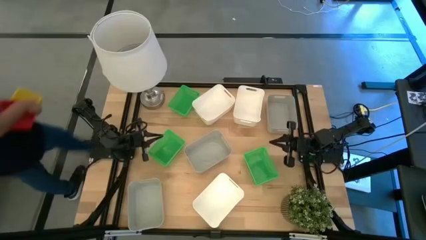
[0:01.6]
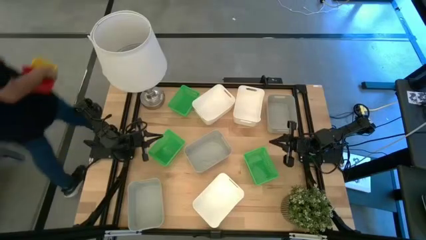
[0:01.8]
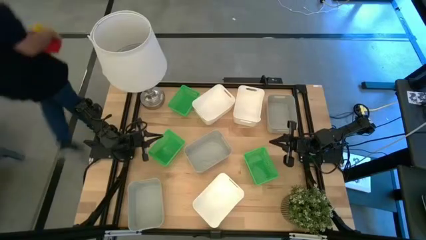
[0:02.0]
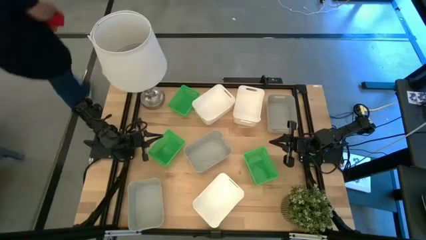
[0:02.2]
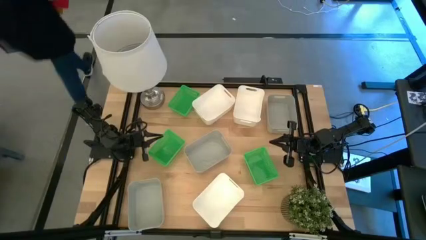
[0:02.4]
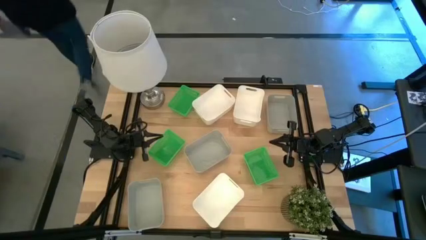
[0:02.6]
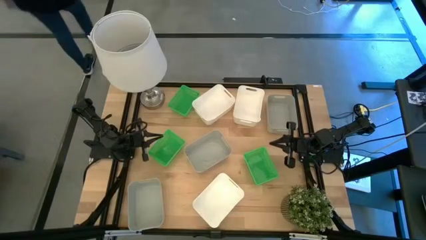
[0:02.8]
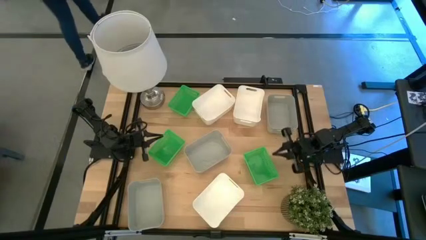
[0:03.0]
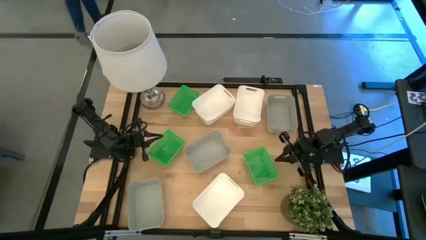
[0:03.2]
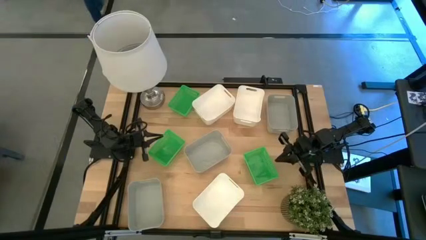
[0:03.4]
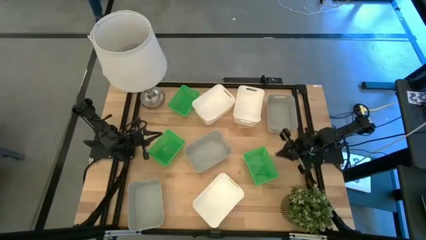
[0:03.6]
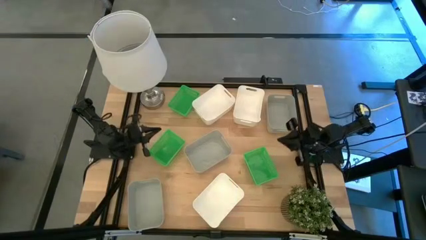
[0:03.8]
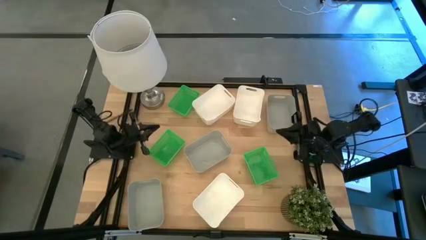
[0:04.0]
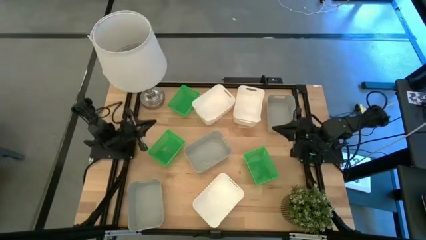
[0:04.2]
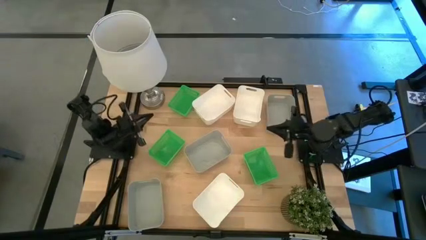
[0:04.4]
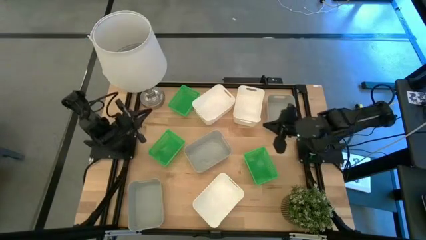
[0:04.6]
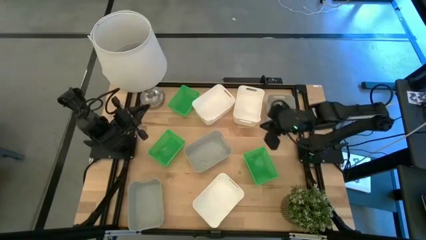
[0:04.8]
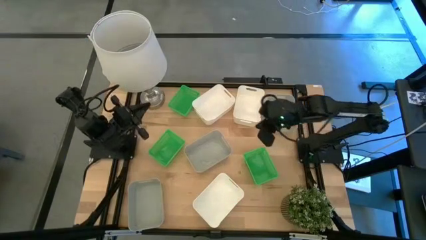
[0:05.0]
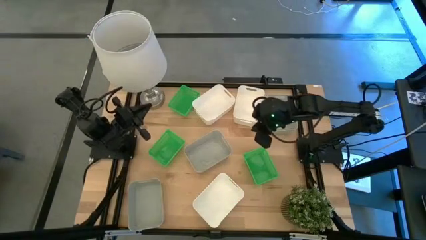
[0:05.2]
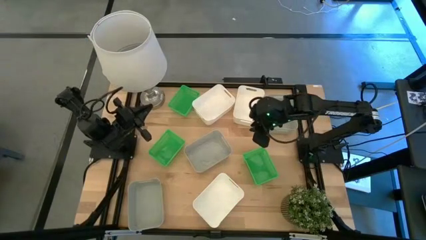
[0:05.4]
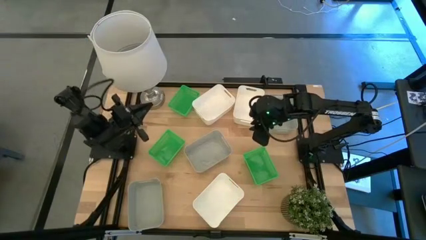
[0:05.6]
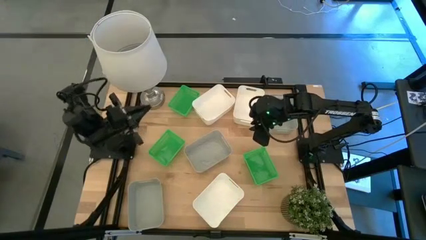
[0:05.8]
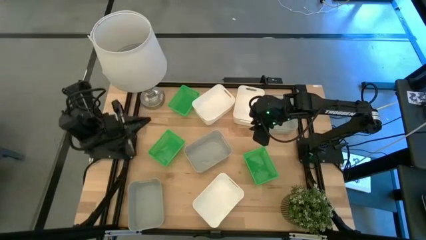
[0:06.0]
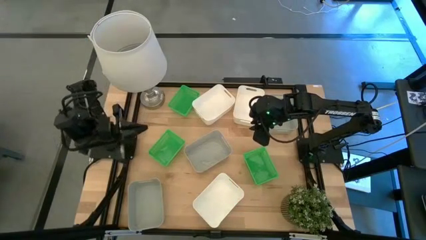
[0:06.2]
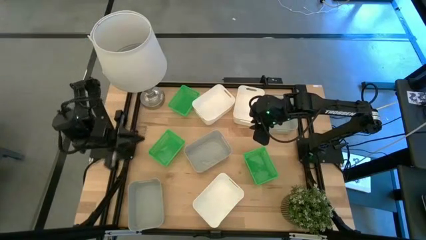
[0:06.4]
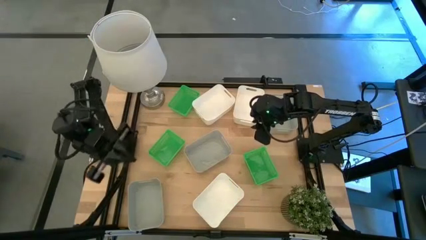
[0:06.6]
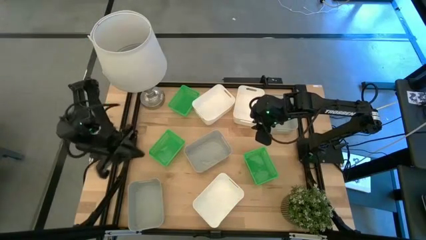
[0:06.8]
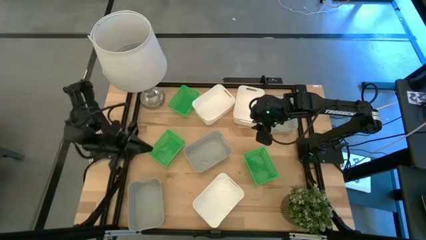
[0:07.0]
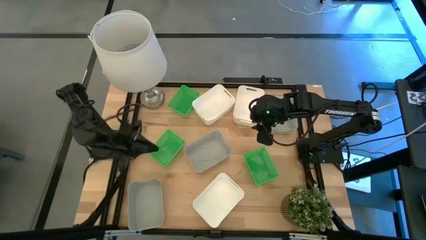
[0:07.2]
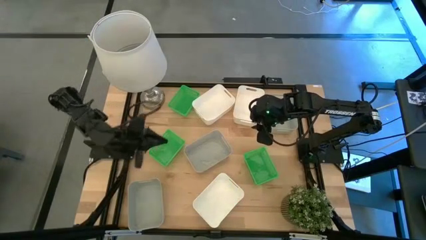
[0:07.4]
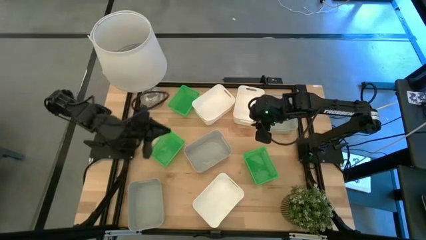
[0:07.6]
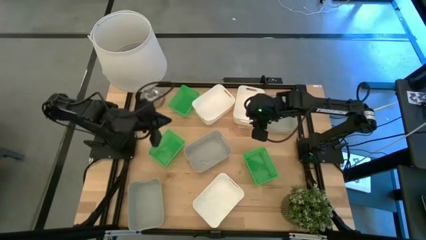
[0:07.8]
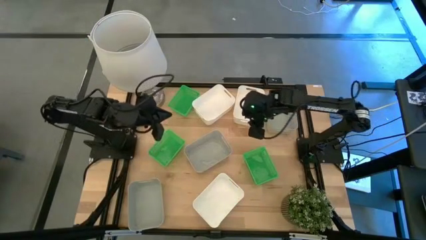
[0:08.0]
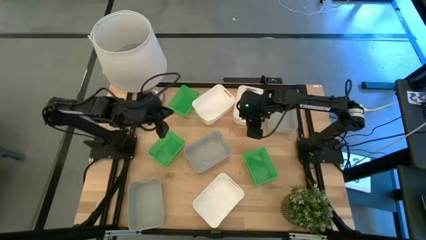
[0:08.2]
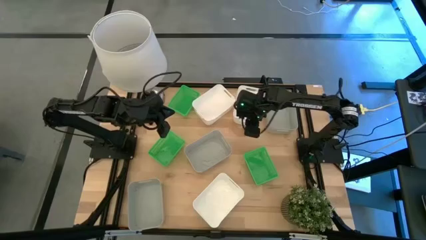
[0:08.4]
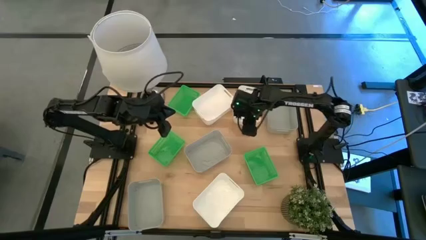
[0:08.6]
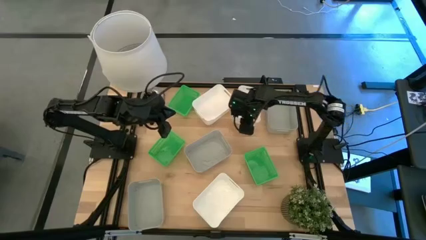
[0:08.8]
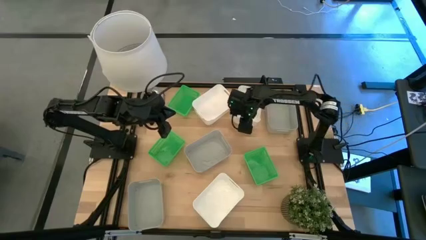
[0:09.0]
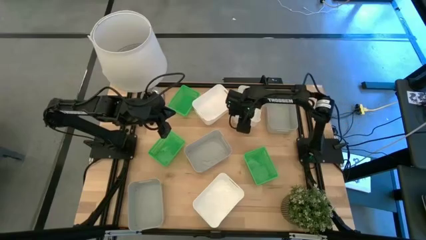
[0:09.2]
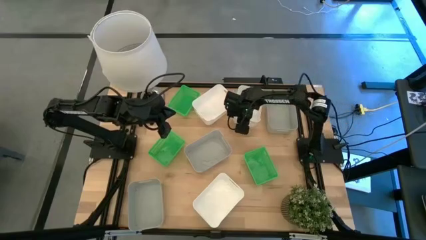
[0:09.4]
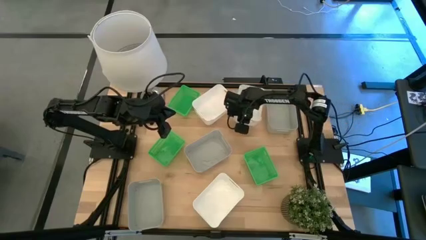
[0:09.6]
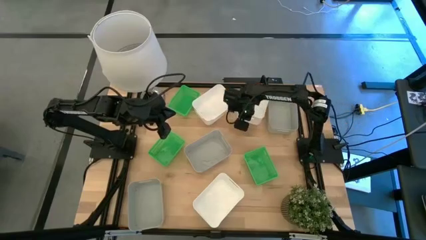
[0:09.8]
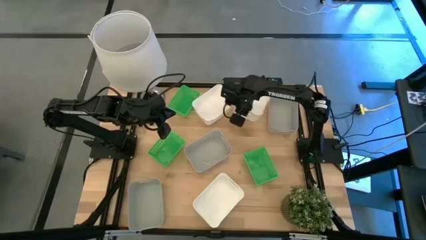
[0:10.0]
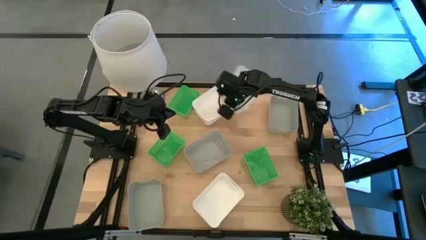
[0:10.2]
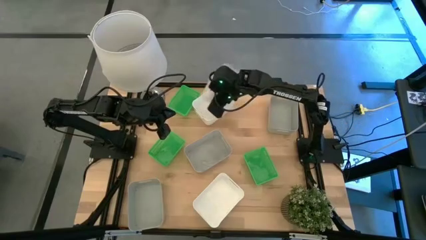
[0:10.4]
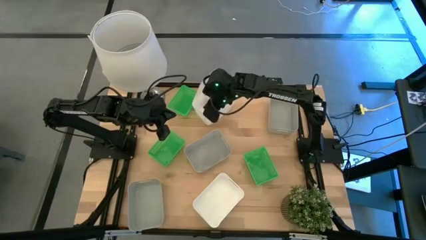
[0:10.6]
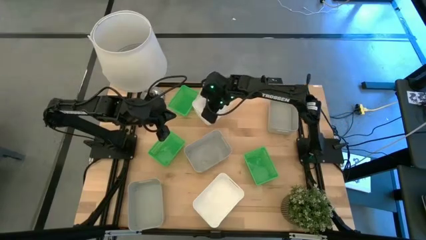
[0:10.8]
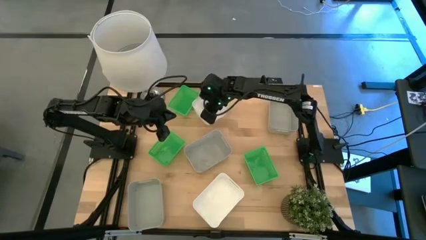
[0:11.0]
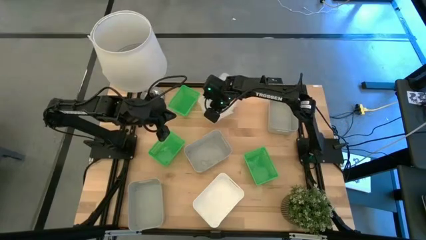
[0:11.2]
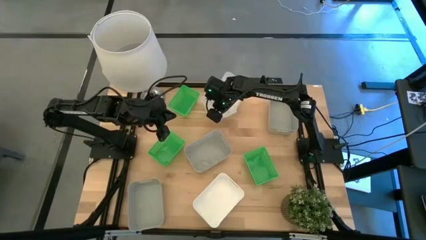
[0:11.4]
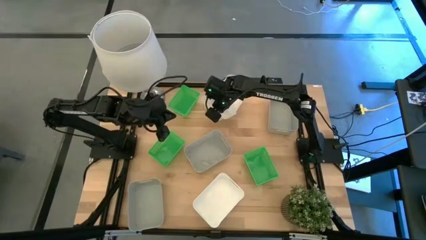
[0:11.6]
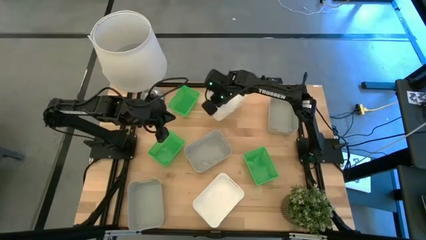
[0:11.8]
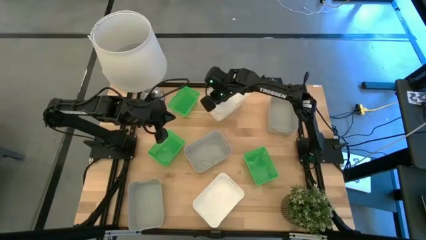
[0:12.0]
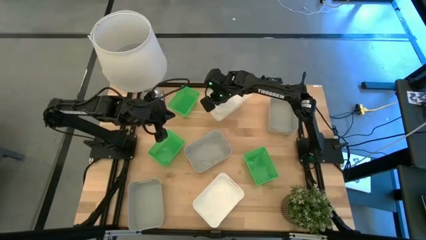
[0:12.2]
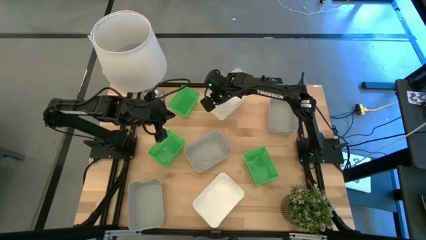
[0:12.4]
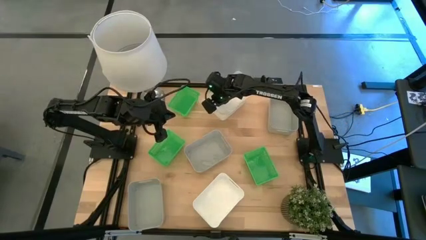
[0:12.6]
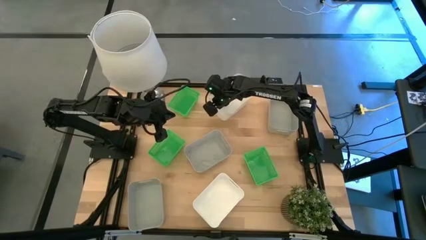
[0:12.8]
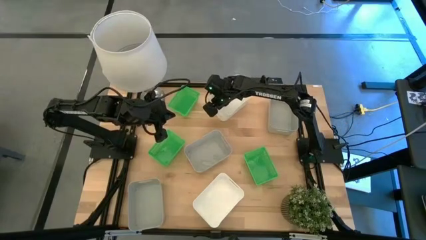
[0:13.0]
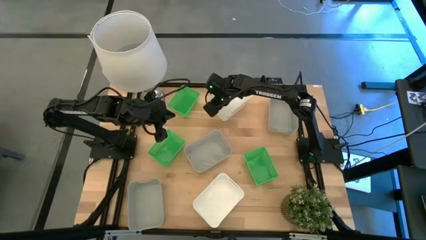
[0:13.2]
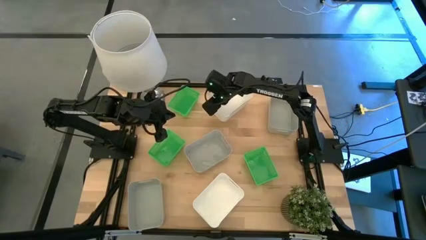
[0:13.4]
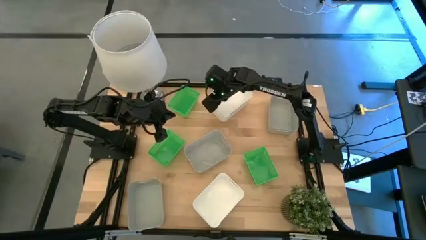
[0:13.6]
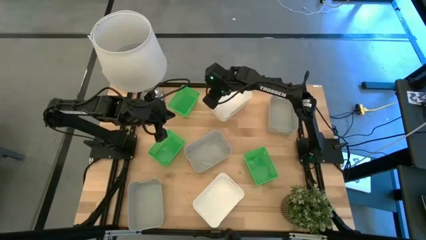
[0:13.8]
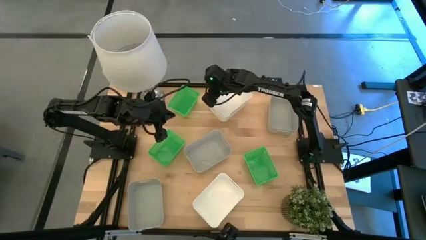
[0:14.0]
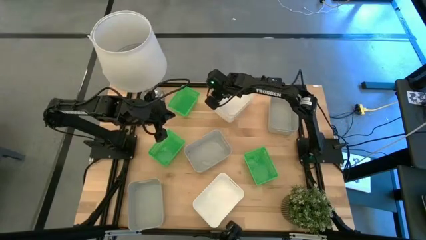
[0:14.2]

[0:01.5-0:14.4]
Stack the top right white bin on the top left white bin
